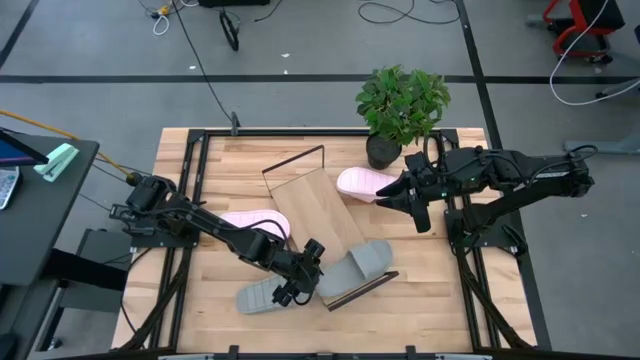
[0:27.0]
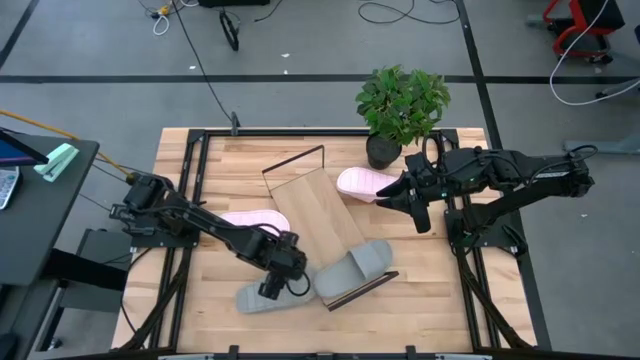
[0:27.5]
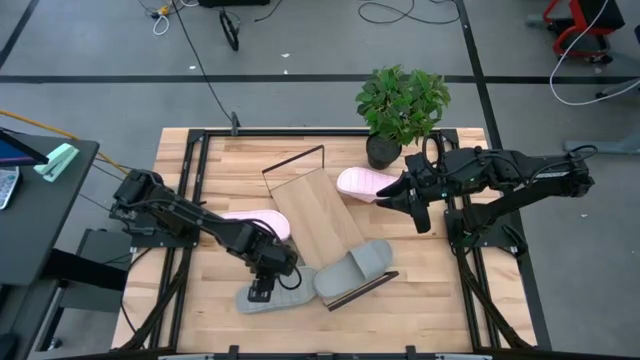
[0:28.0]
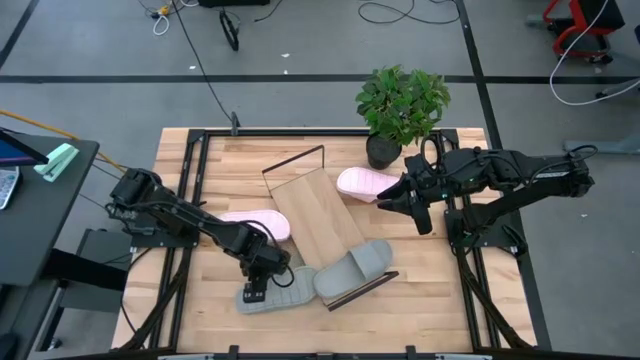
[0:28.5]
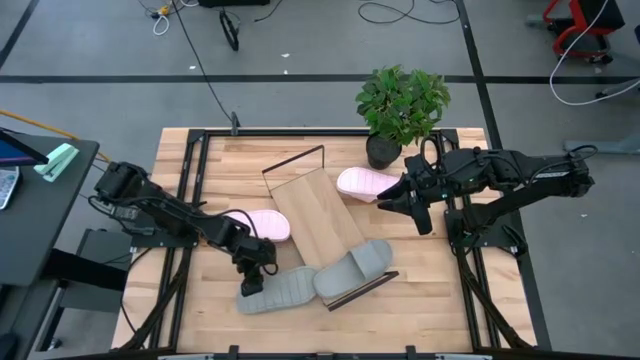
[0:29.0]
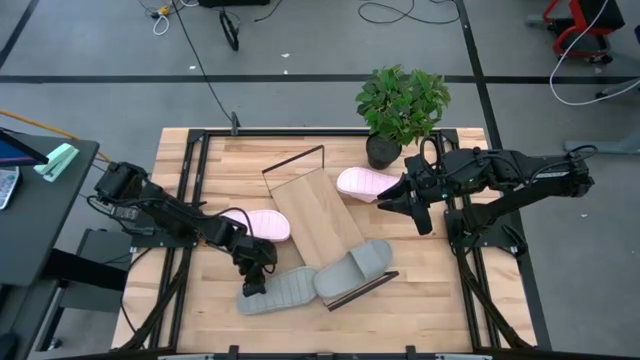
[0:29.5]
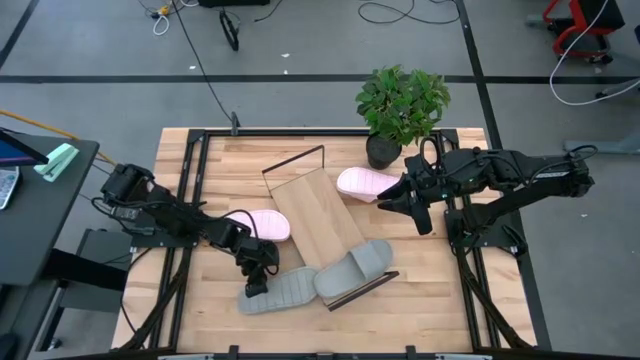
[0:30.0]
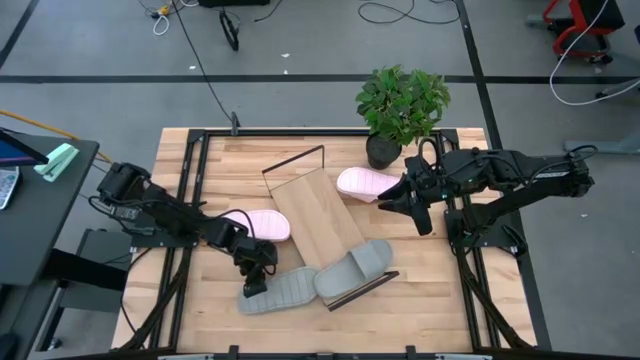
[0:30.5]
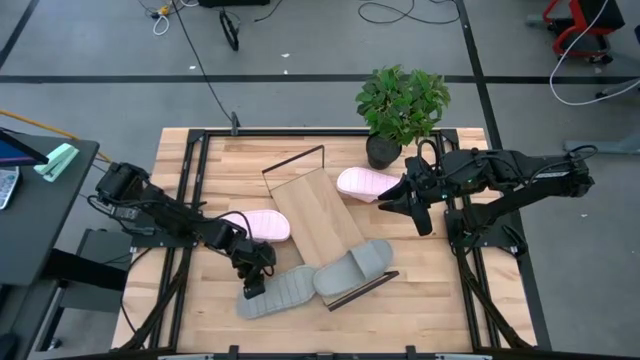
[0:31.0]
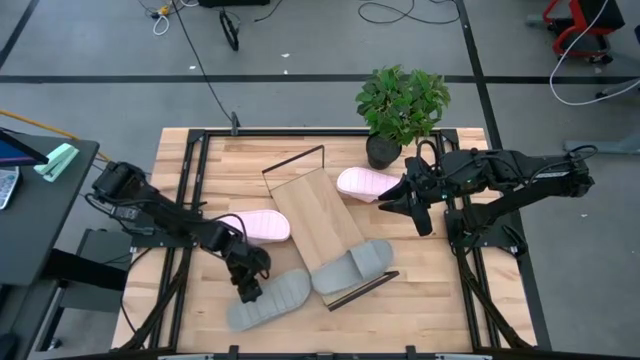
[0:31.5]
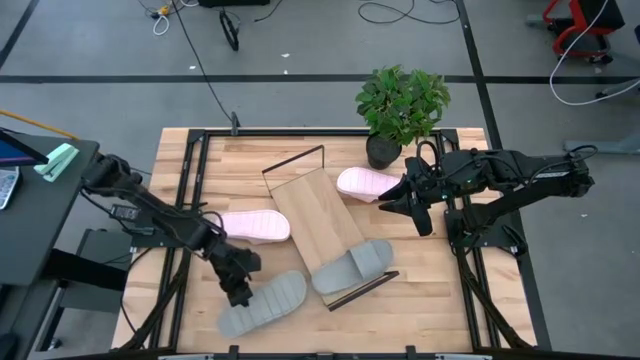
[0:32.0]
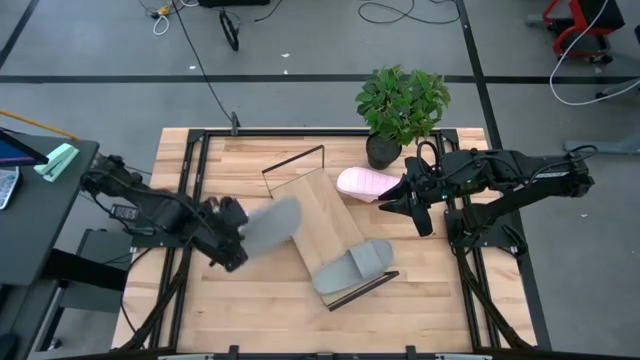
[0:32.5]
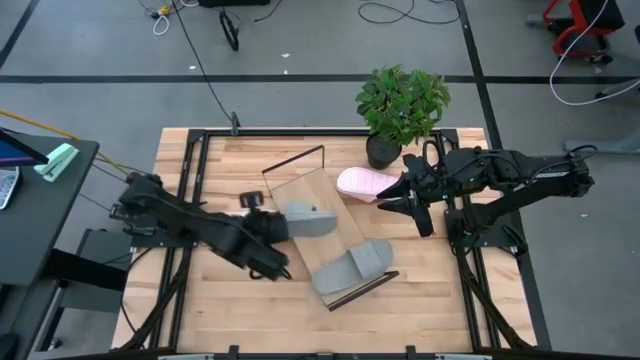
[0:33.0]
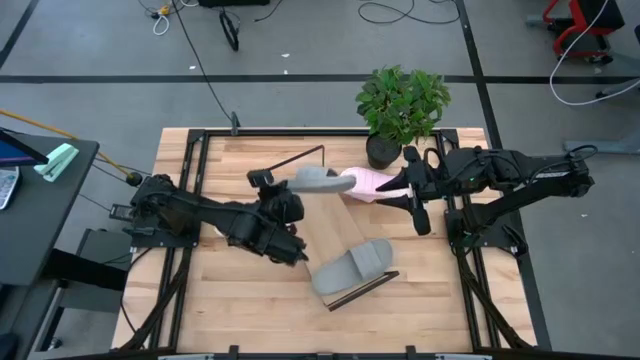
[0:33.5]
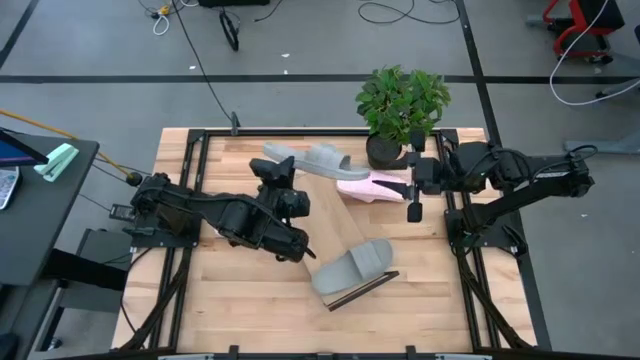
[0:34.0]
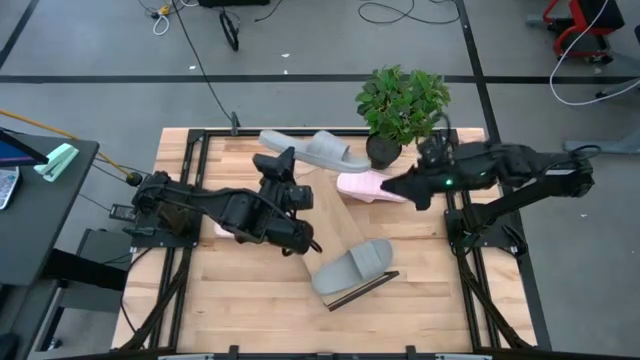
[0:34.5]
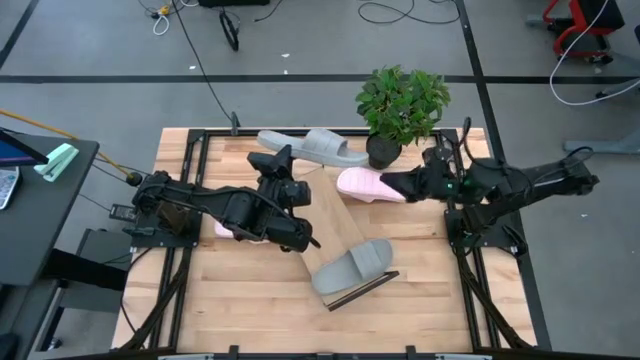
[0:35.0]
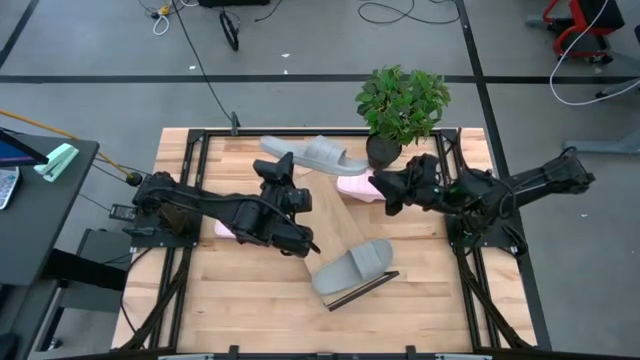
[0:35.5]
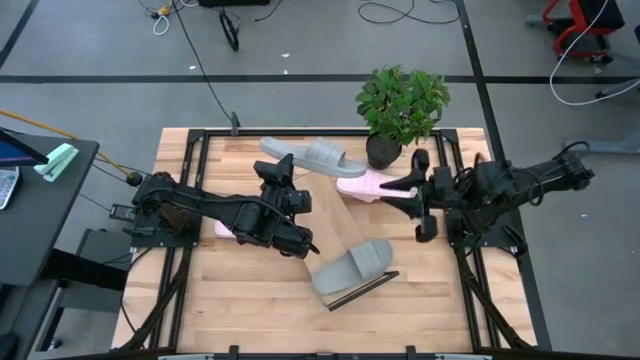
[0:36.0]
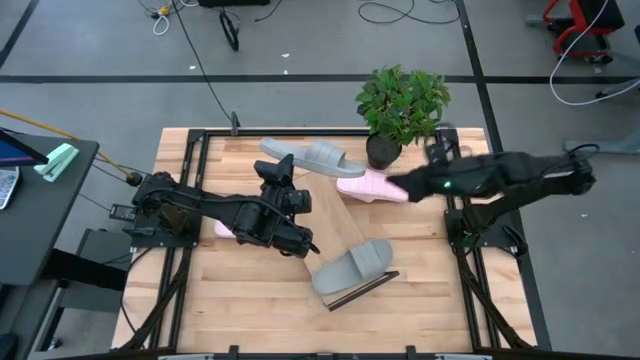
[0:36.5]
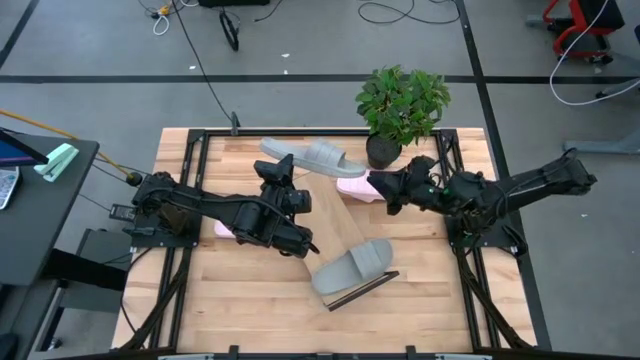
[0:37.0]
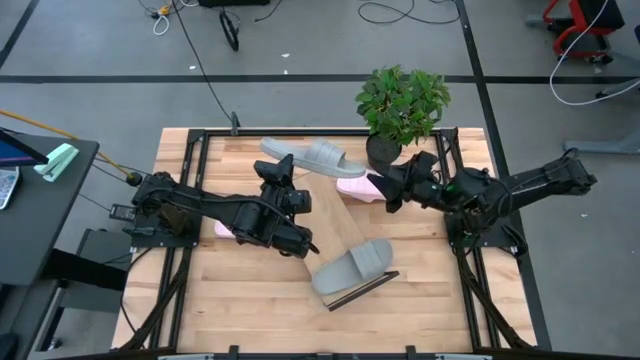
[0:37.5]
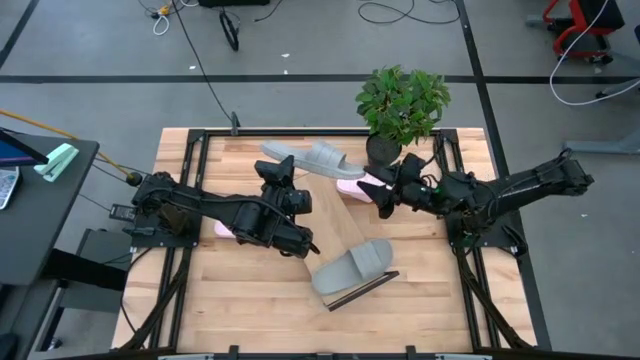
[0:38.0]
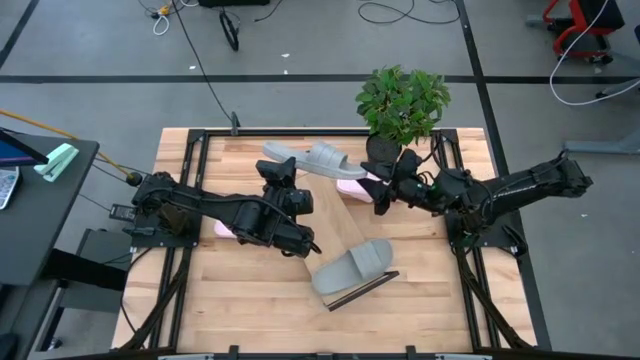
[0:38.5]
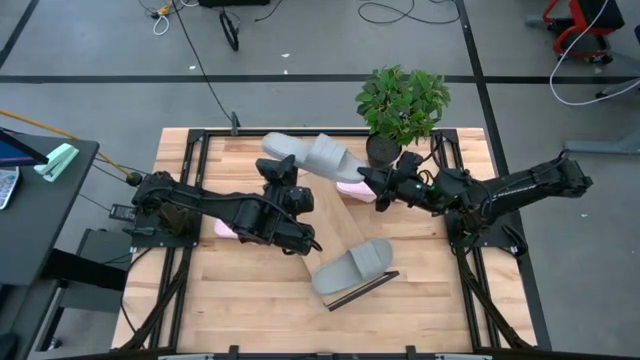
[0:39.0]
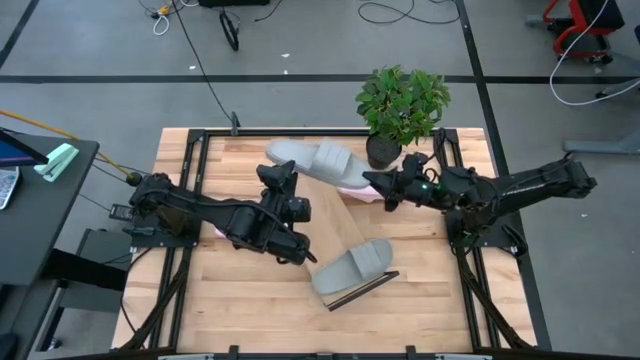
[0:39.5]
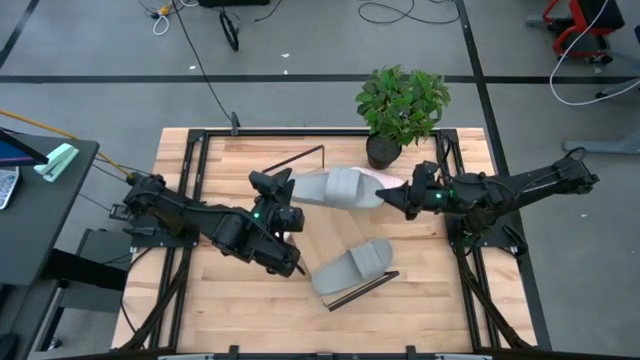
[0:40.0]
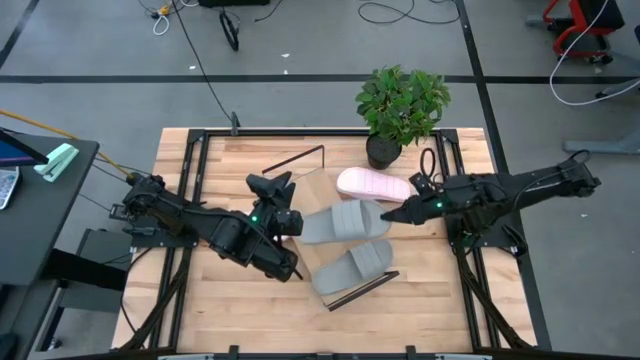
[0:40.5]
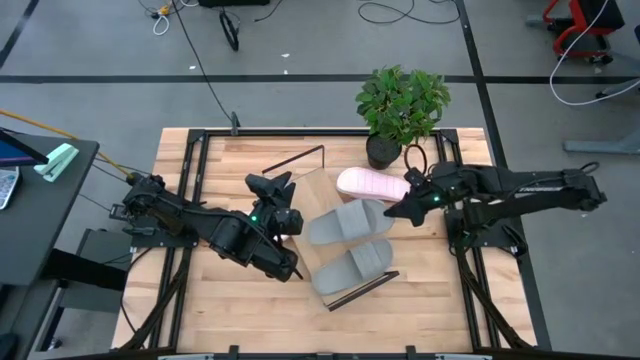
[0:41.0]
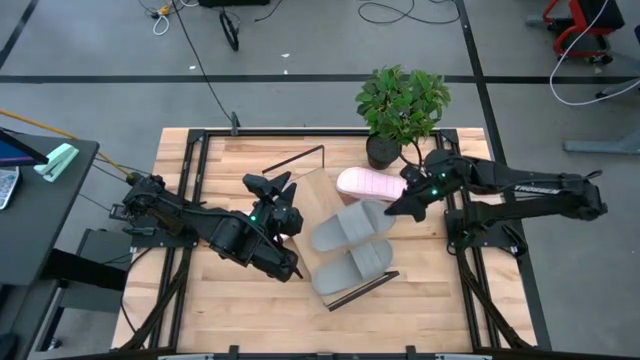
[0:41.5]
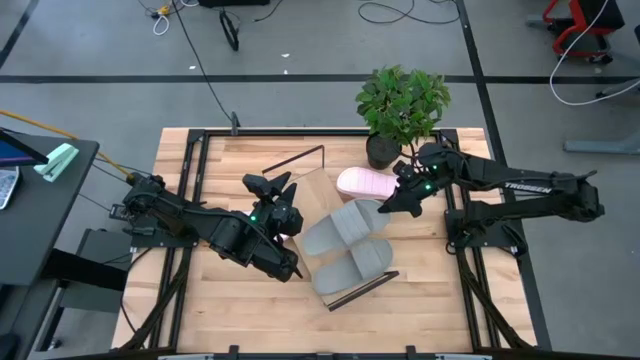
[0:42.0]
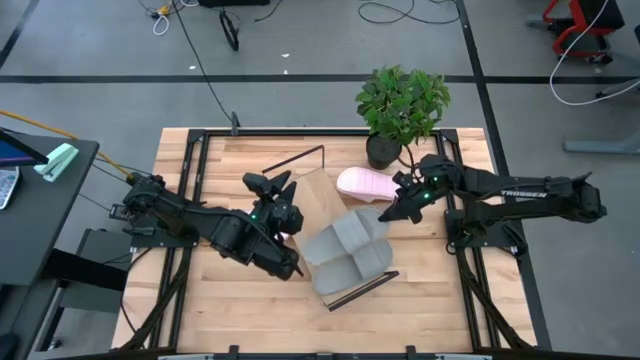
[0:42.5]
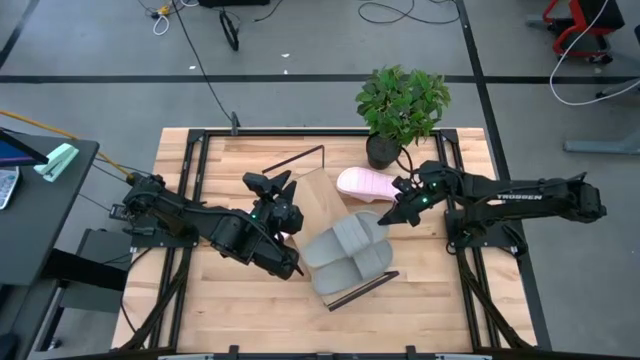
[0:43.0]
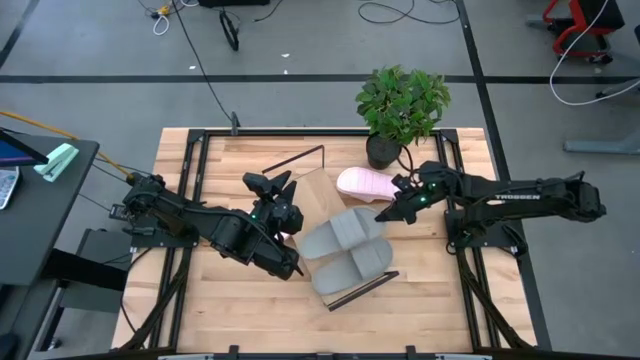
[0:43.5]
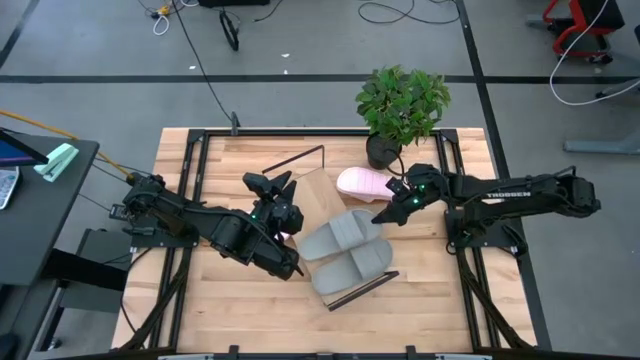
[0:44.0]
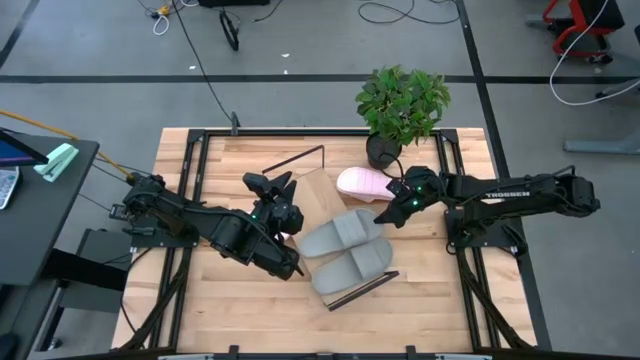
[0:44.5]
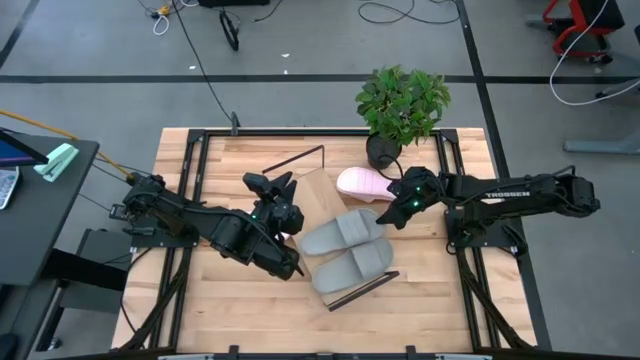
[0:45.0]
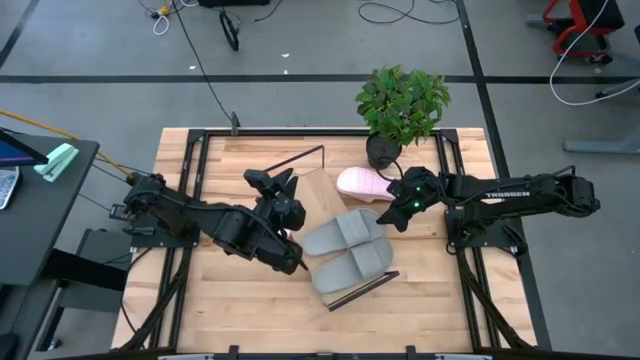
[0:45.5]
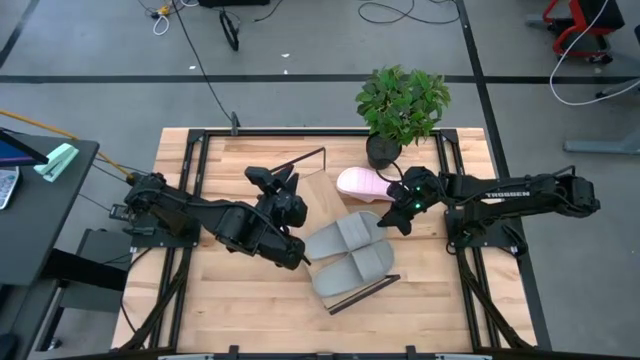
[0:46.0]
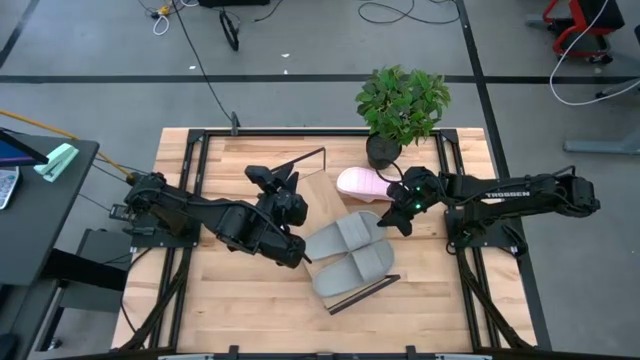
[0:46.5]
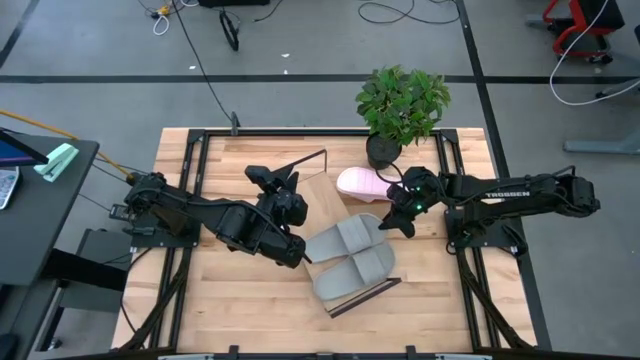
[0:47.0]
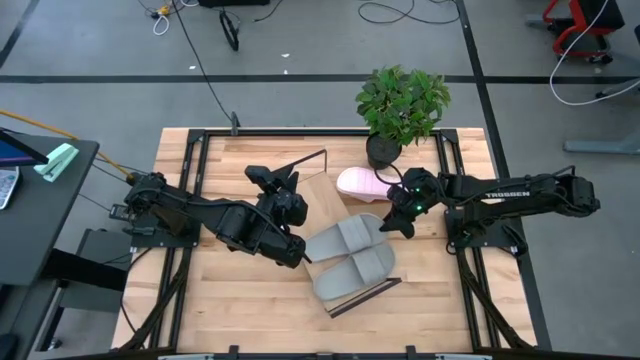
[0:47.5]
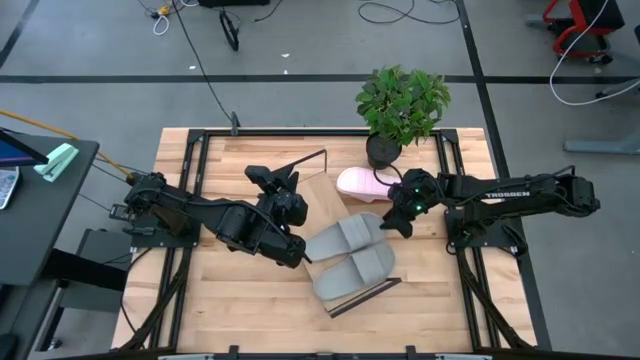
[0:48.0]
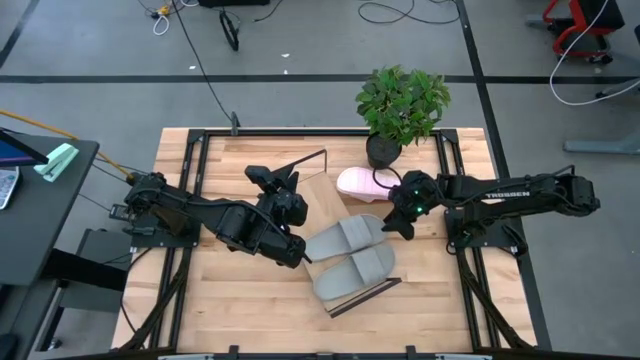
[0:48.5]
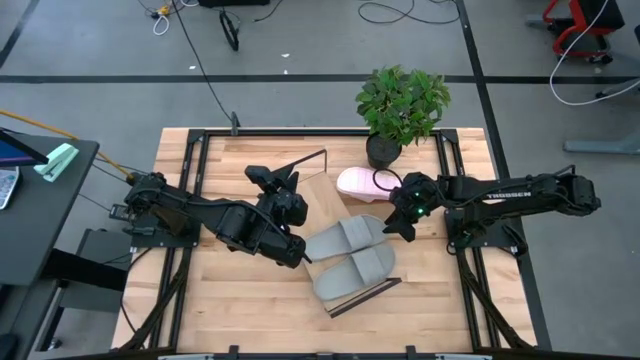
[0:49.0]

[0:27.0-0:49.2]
Task: Pick and place slides into the shelf
Put the gray slide on the shelf
